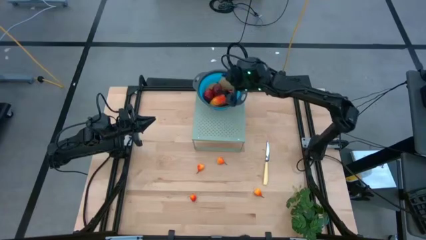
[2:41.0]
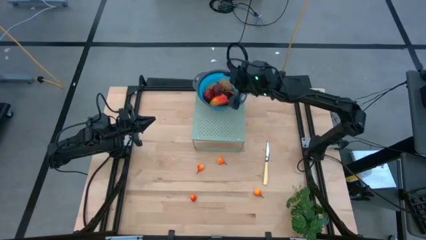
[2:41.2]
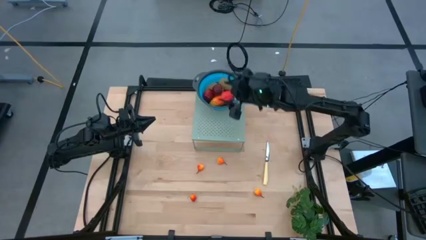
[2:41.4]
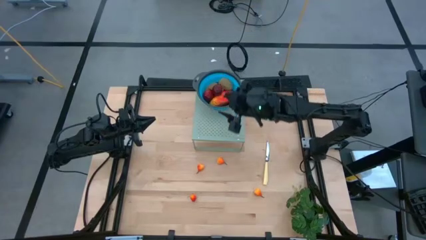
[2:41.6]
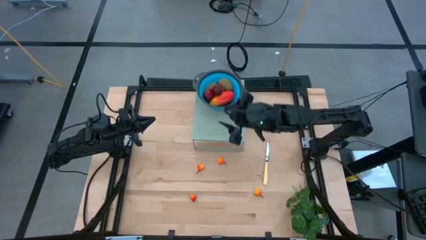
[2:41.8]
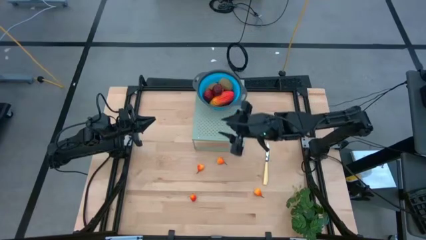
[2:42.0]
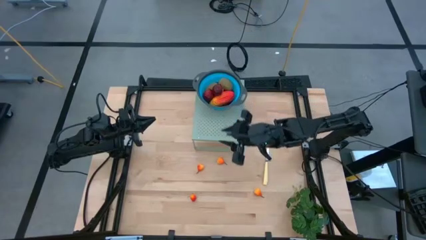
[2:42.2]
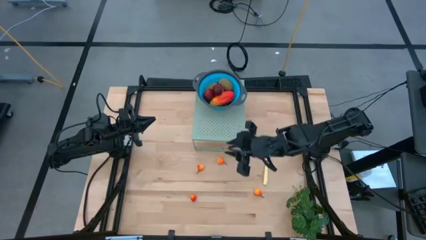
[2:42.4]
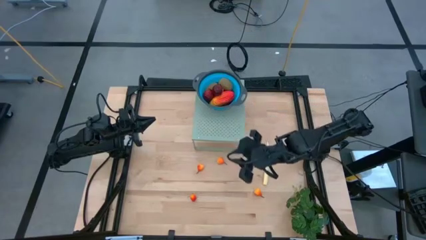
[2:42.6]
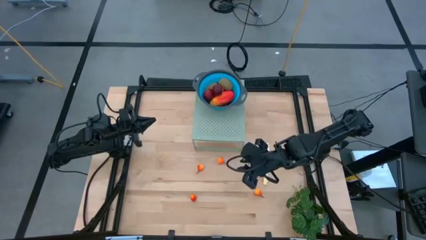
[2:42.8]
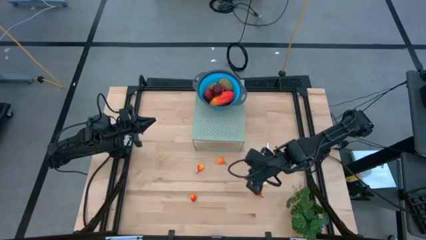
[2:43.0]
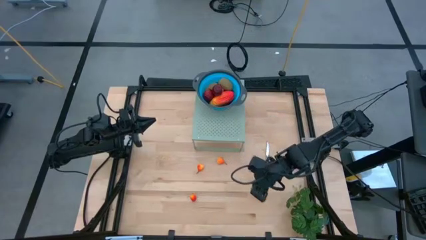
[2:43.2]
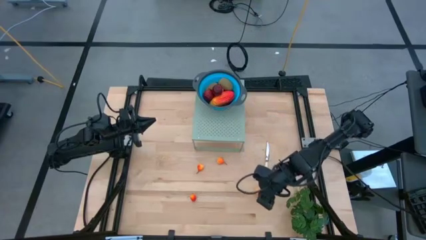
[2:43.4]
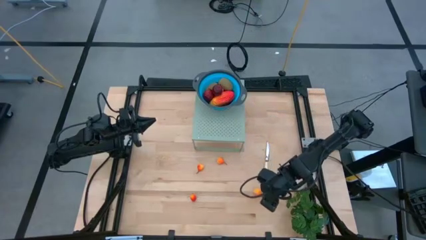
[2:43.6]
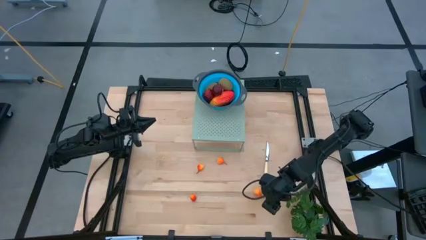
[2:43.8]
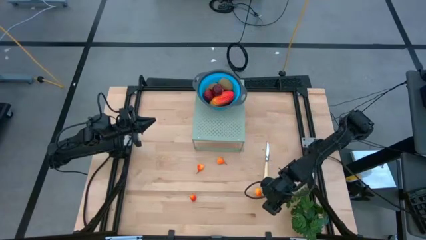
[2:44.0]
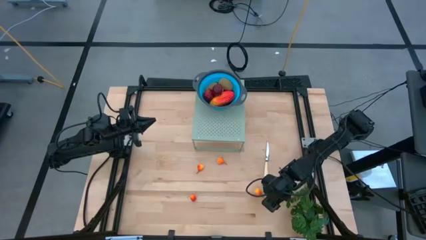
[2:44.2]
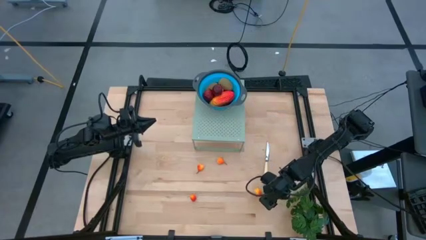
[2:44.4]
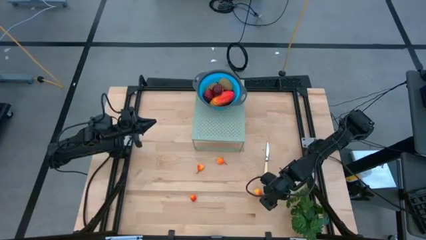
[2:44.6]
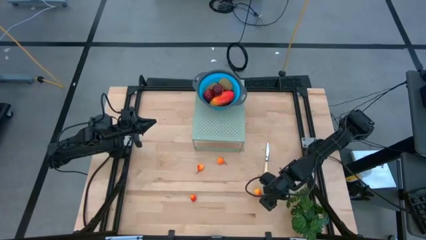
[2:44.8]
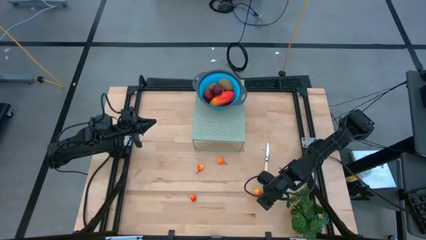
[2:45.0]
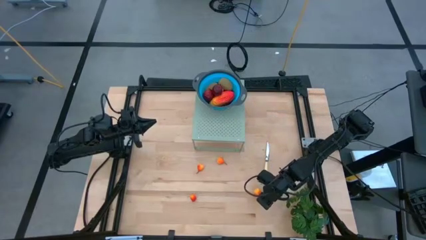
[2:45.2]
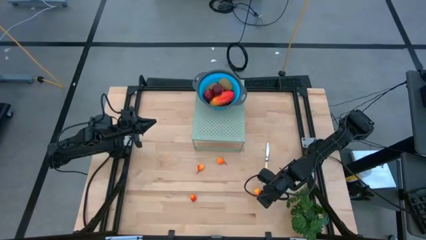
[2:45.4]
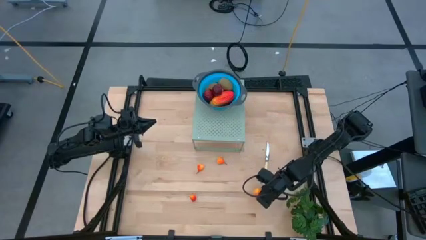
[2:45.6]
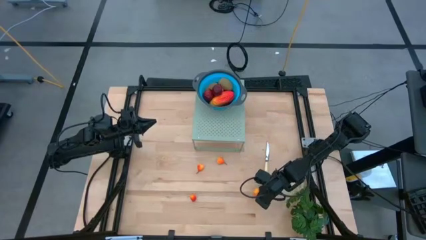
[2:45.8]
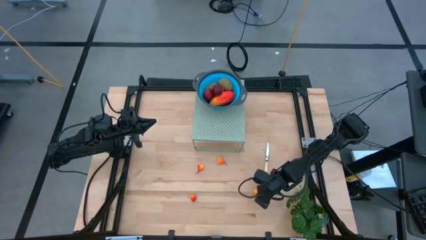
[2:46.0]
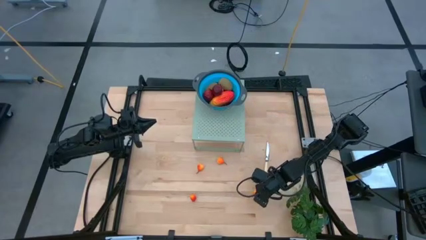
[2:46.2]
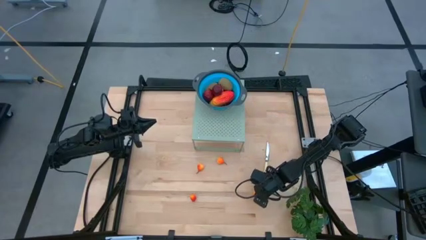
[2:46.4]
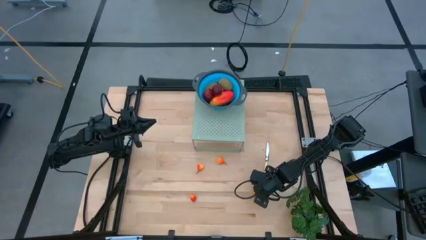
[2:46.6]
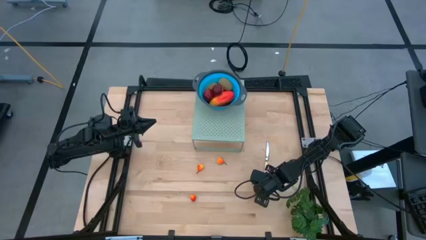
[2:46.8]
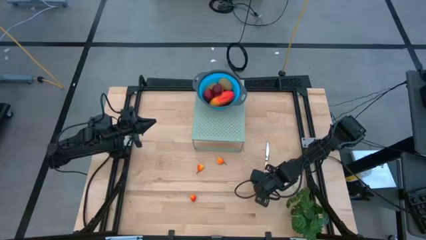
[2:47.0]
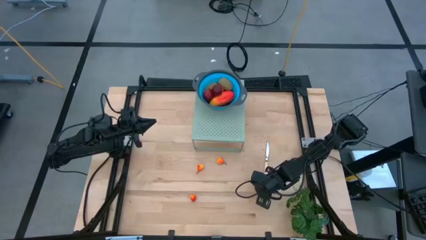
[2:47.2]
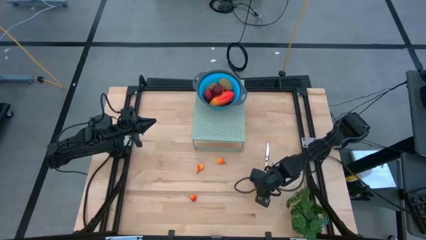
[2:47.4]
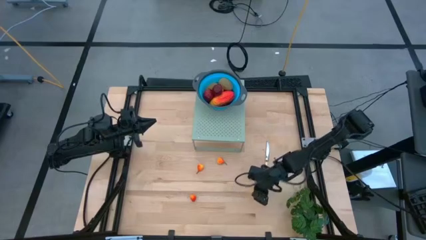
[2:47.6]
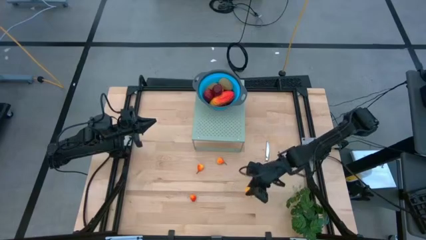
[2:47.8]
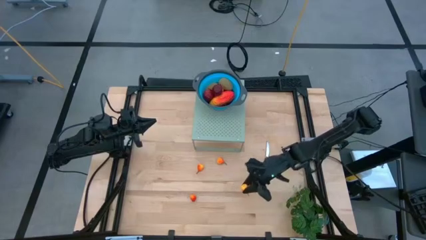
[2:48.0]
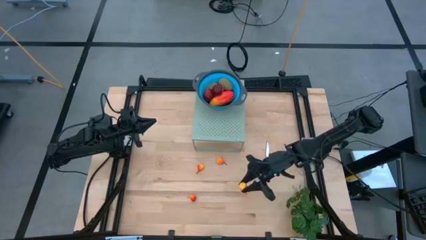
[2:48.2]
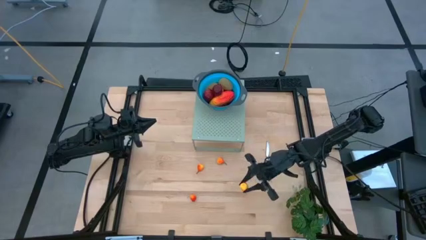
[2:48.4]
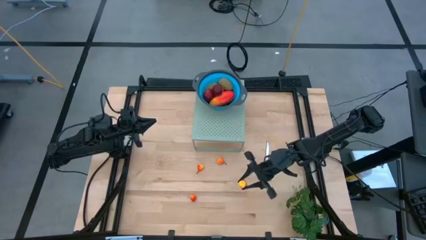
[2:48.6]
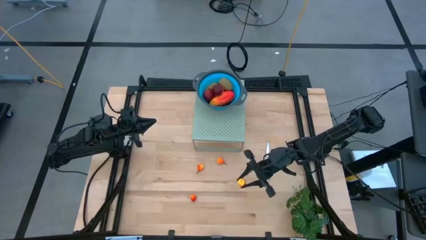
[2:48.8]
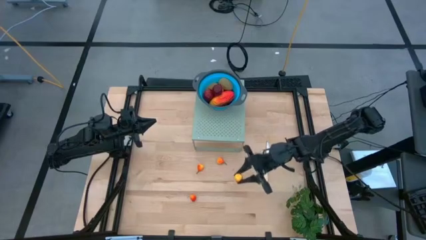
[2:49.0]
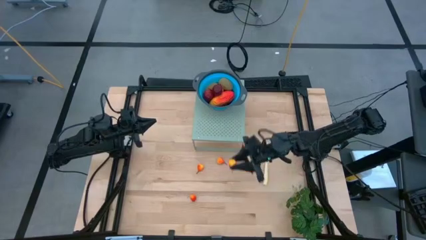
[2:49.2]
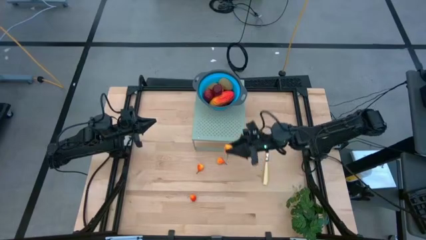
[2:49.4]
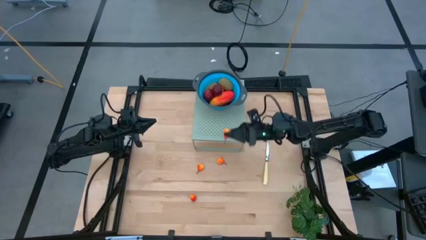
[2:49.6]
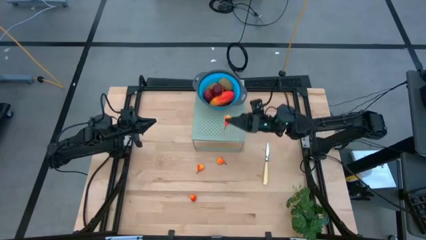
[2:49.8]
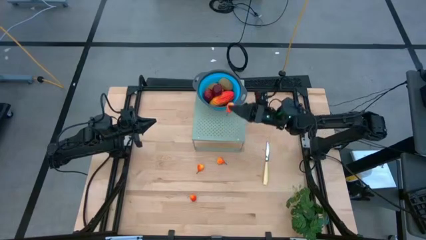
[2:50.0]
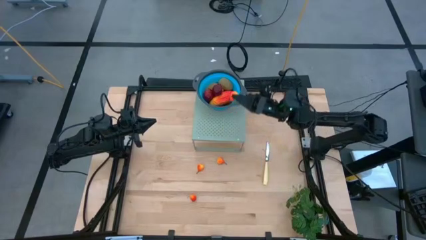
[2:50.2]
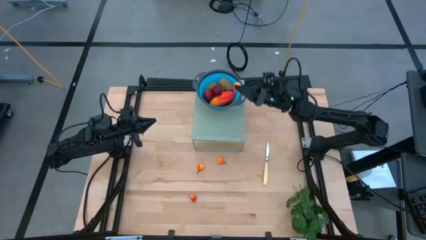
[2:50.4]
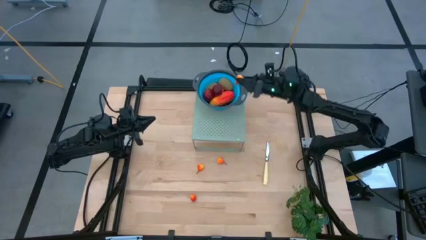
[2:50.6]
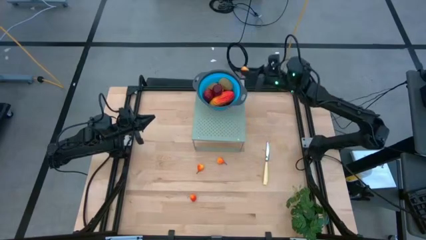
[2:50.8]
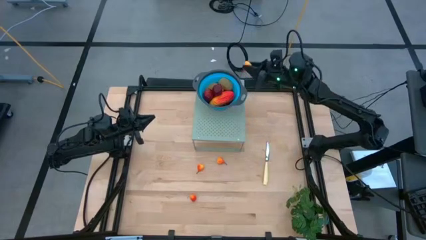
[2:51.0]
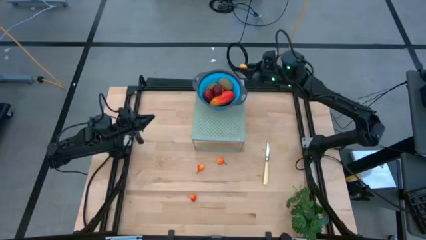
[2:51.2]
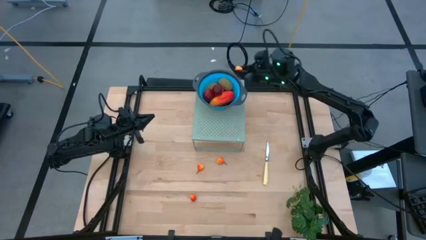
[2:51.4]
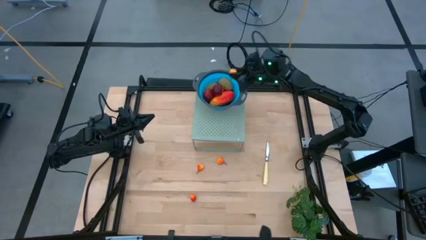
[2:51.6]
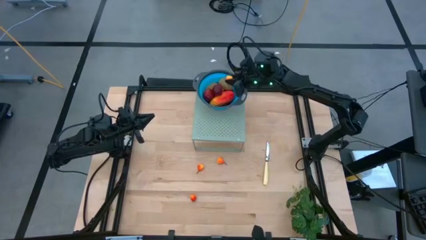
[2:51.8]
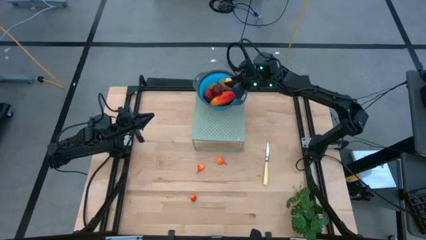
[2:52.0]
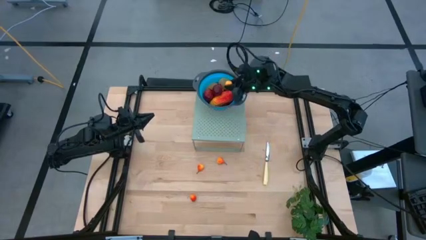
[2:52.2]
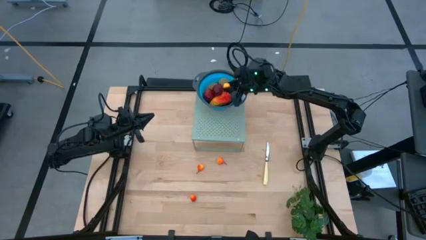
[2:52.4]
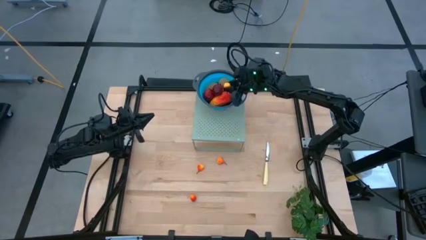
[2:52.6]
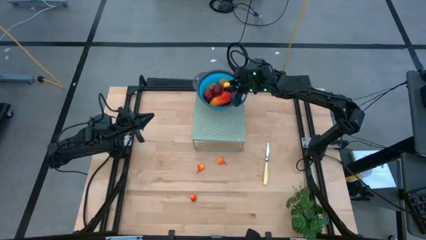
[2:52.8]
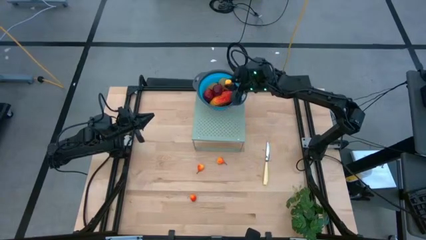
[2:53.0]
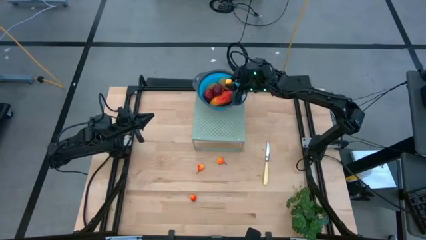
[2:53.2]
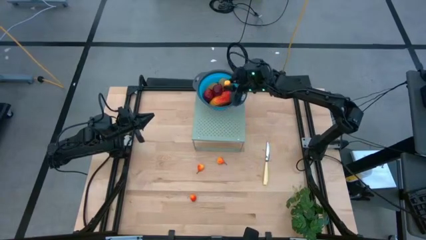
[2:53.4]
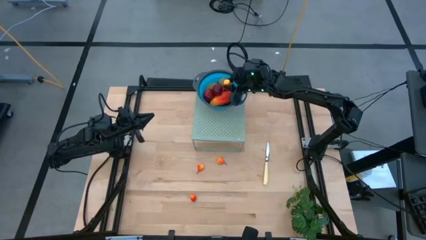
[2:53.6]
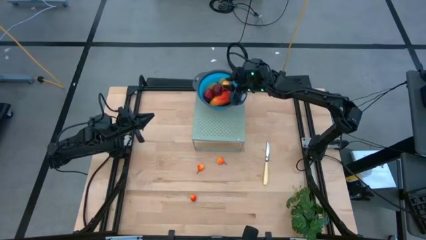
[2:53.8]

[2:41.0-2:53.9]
Task: Pick & Place Fruit
Put the peach into the blue strainer bowl on the shelf

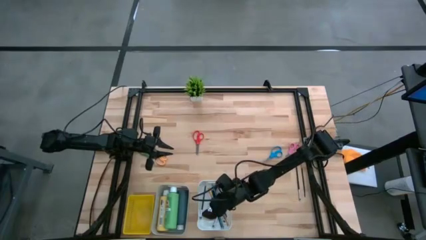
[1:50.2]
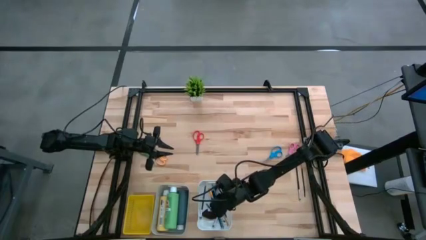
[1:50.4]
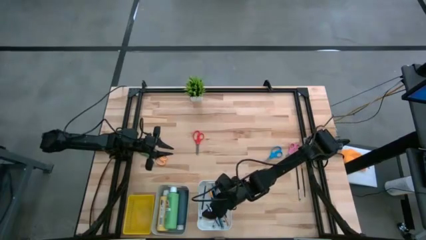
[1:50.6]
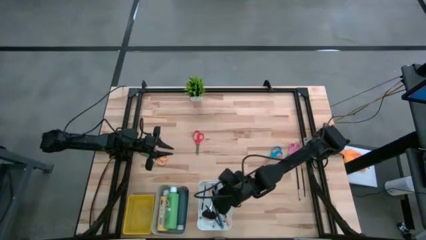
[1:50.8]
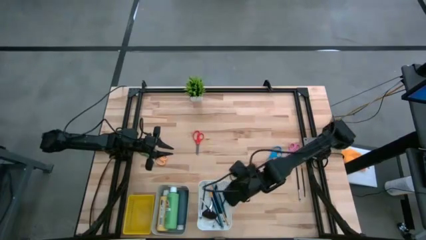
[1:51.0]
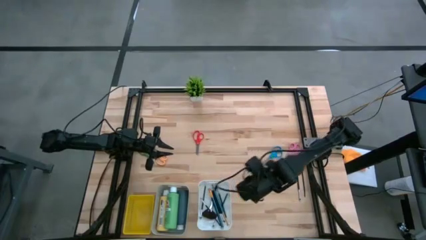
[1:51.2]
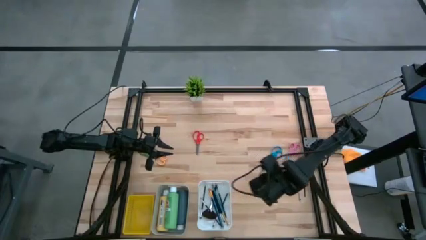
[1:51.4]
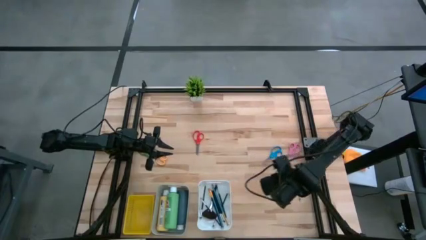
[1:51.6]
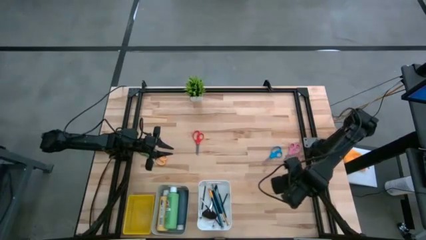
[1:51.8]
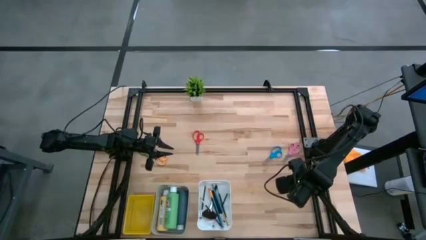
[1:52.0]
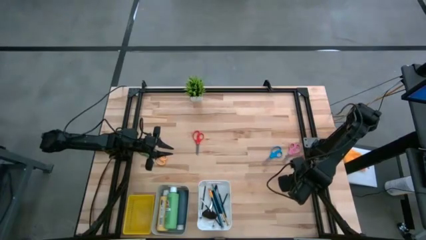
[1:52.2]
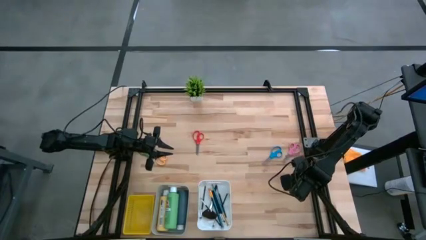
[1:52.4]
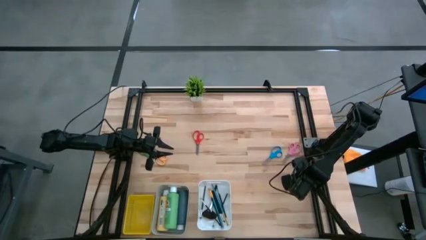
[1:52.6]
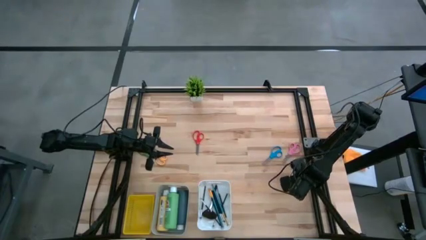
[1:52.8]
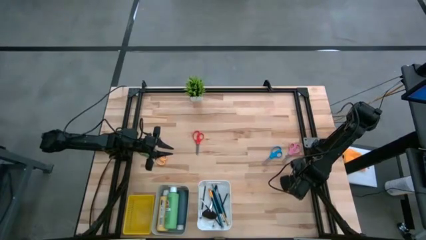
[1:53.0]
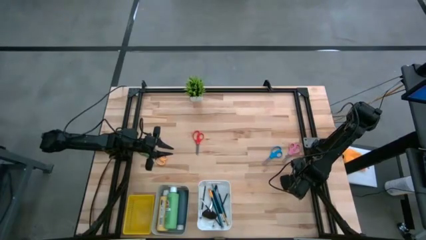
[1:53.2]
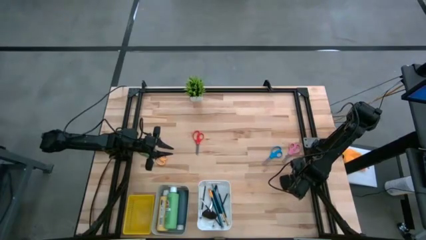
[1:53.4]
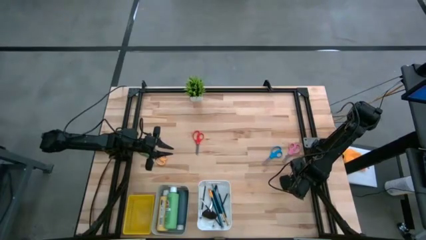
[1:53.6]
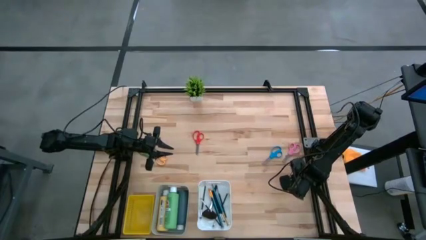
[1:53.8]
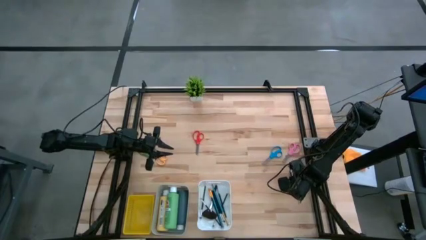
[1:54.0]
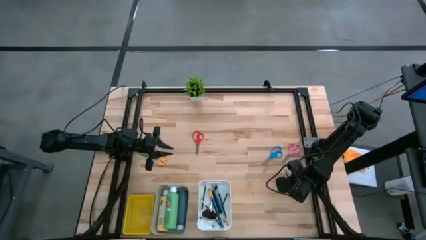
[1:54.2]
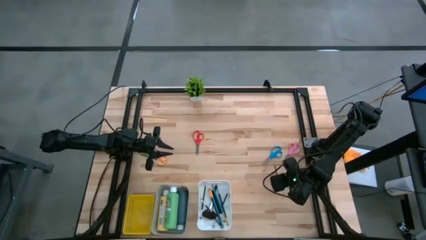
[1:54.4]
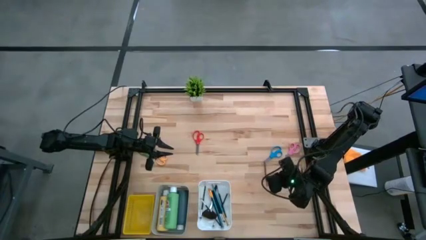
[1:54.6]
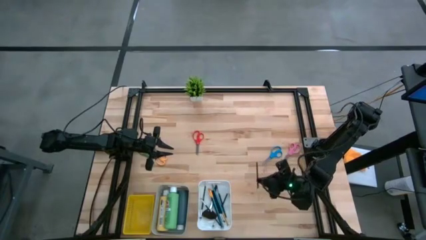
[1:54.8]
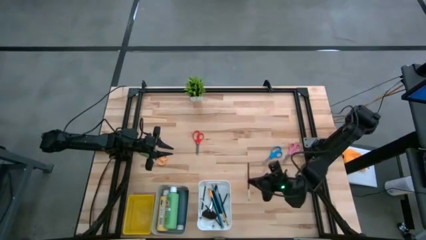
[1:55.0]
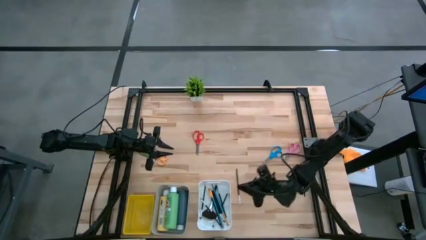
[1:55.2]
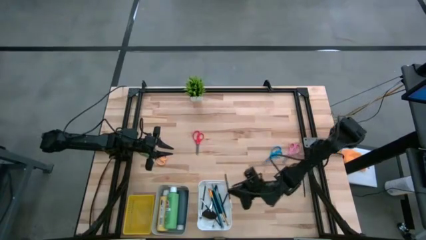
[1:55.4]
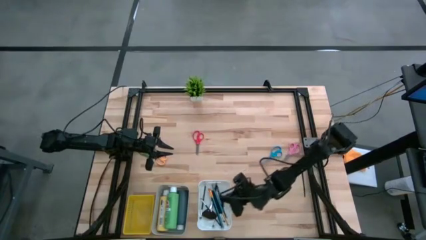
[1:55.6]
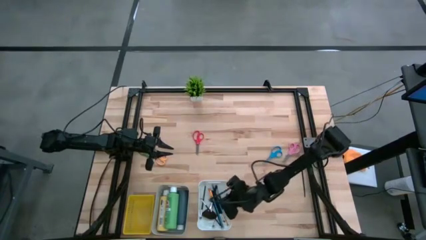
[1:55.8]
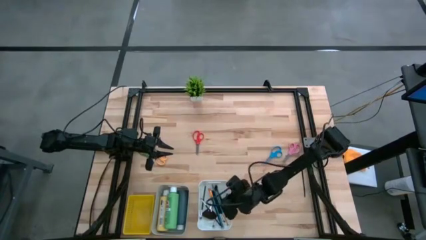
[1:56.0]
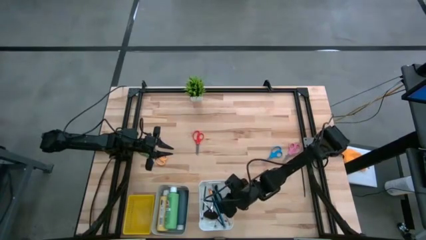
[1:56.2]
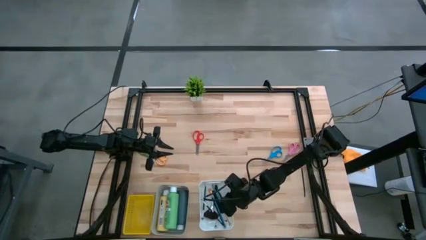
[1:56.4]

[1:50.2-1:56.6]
Task: Pick & Place Paint Supplies
Put the black paint brush into the white bin
